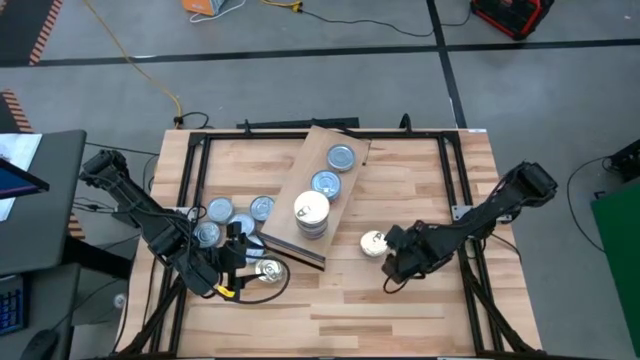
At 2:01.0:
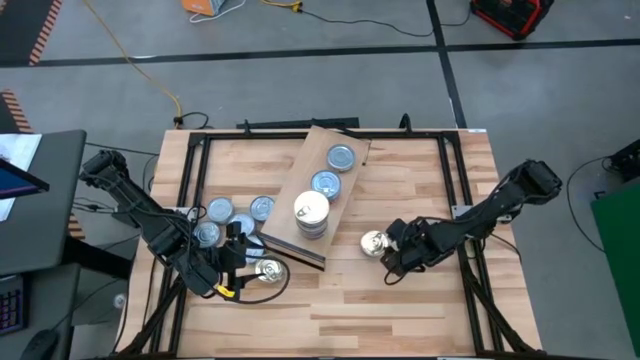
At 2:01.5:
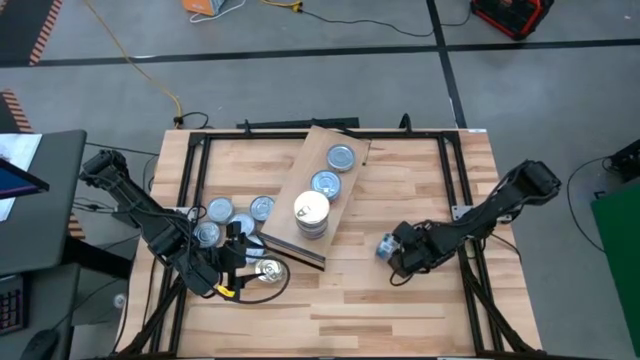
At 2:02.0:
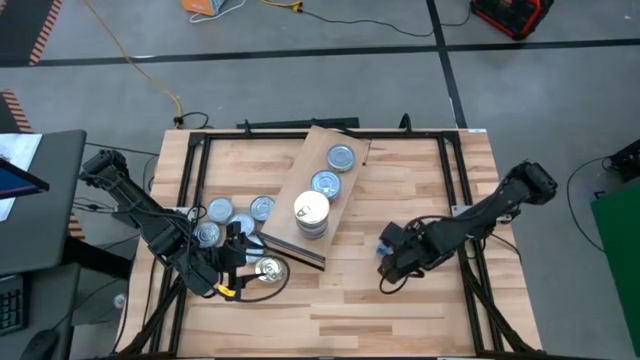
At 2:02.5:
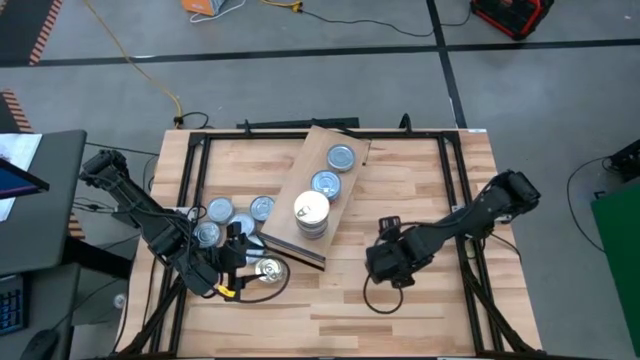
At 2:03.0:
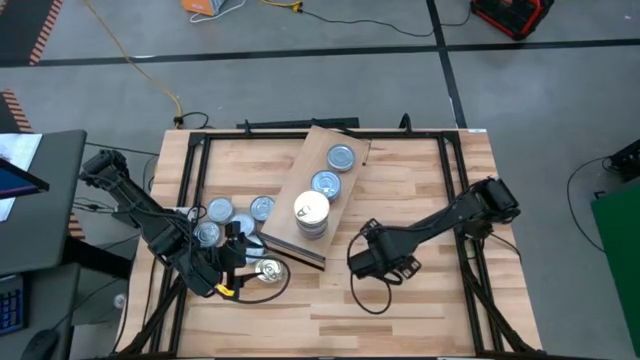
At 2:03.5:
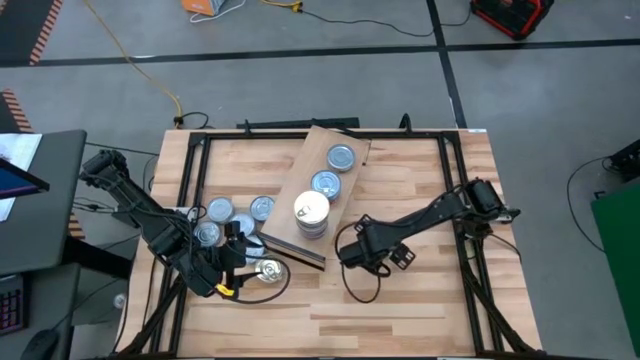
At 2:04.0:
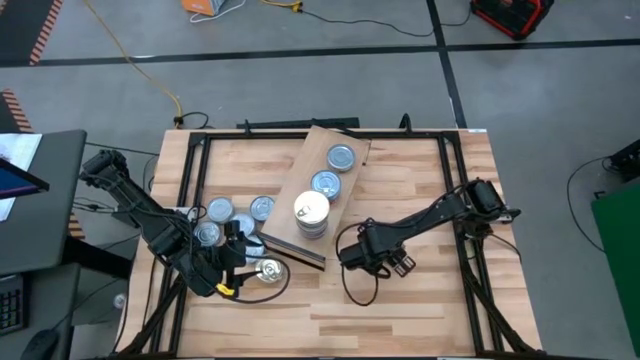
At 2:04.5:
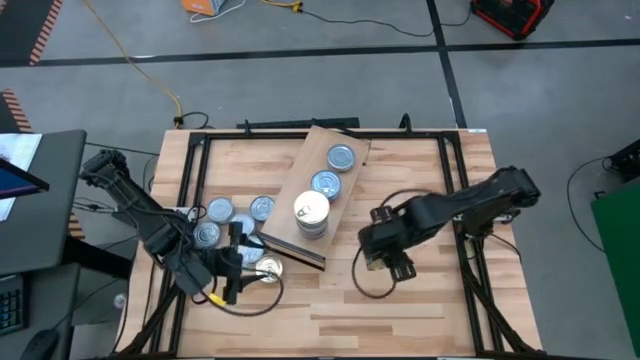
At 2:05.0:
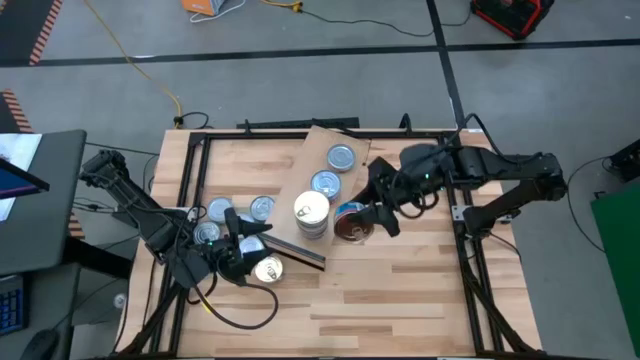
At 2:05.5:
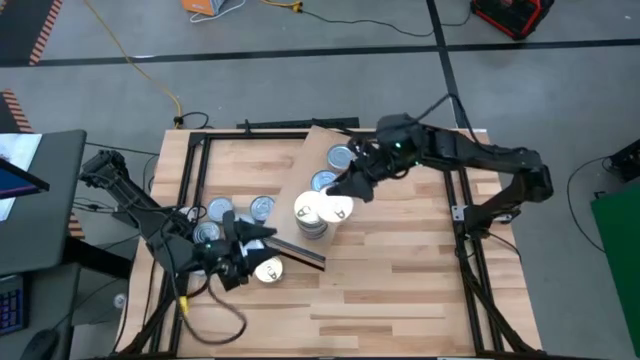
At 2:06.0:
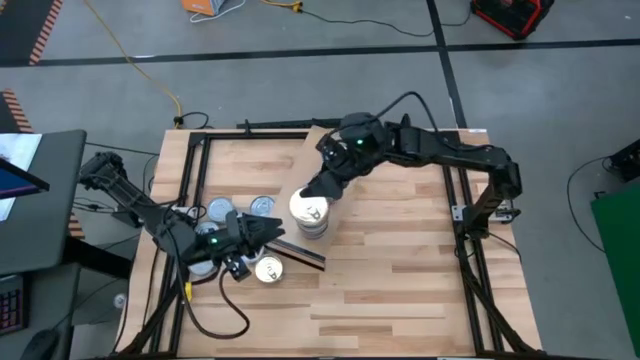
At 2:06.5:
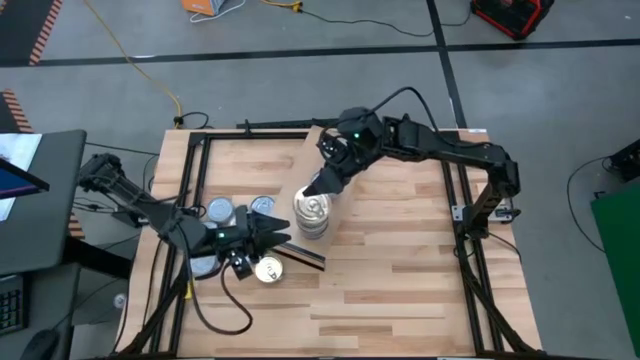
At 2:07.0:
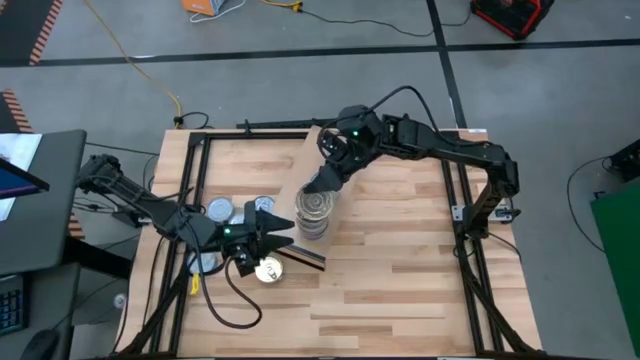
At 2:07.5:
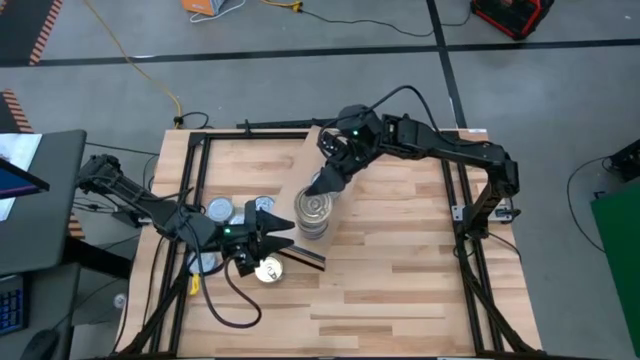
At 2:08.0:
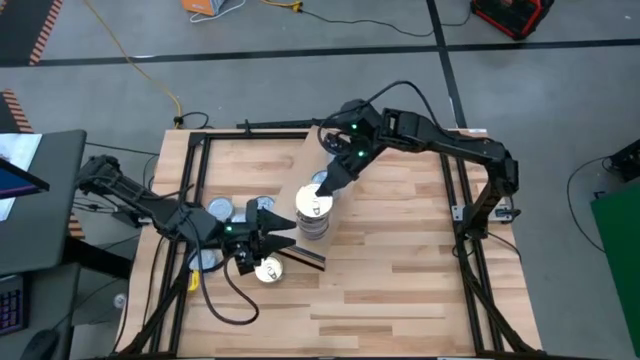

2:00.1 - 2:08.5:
Task: Stack canned seafood by type on shelf
Stack the blue pink tuna can on top of the blue pink tuna can on the shelf

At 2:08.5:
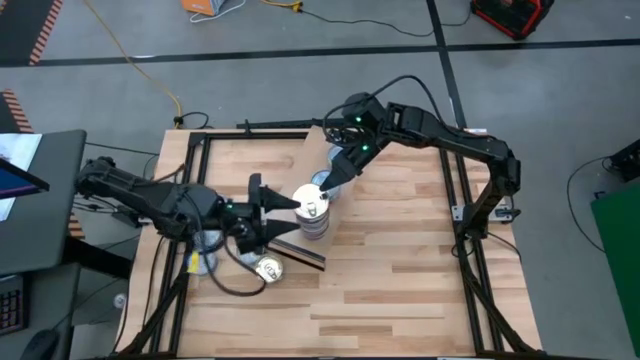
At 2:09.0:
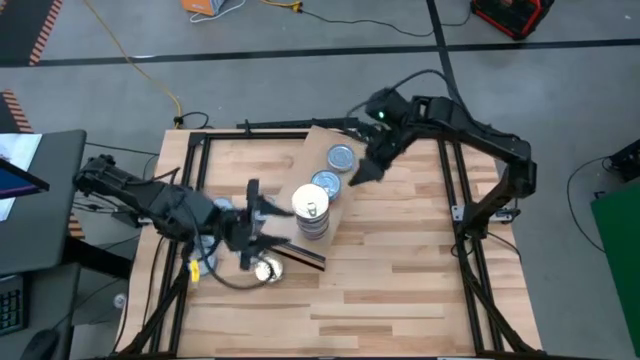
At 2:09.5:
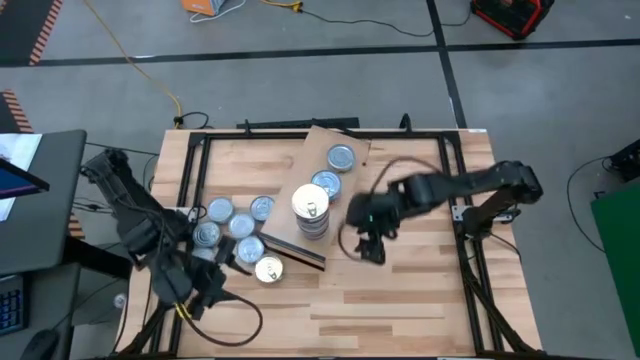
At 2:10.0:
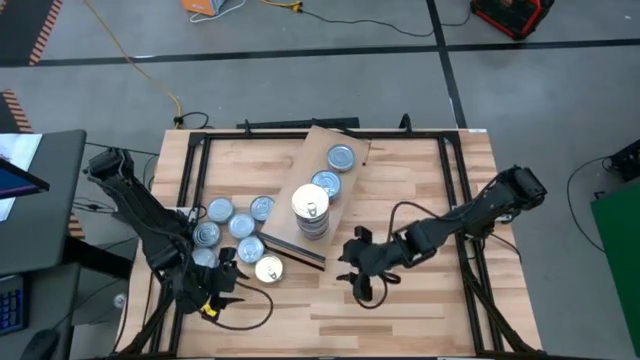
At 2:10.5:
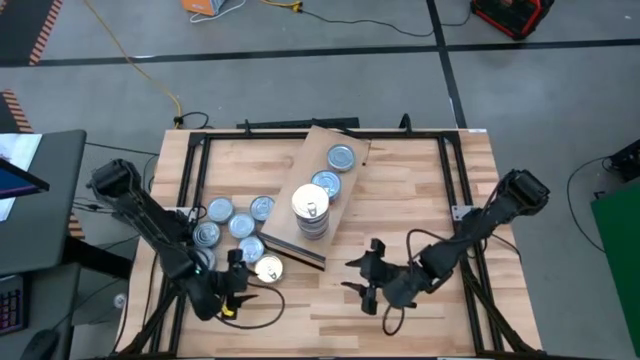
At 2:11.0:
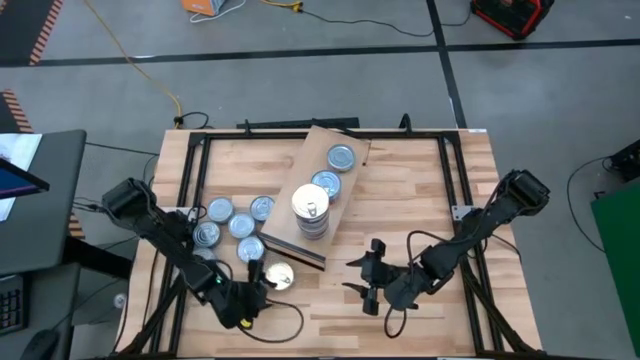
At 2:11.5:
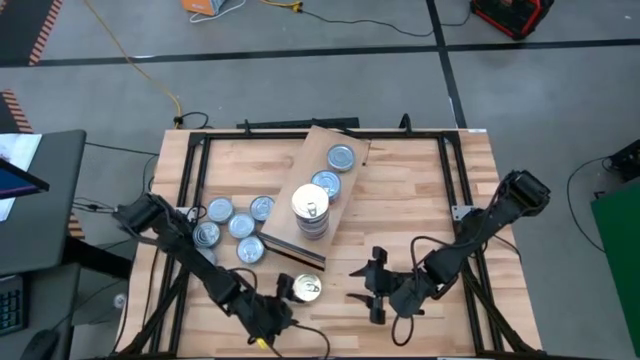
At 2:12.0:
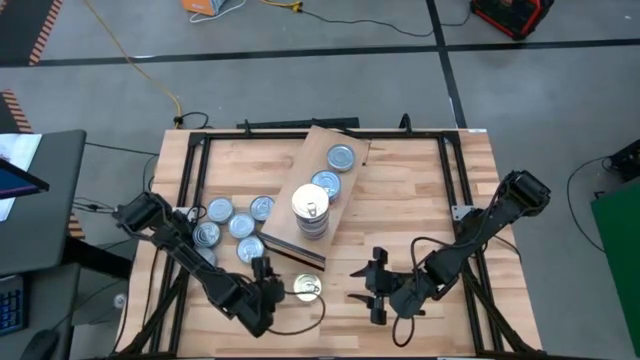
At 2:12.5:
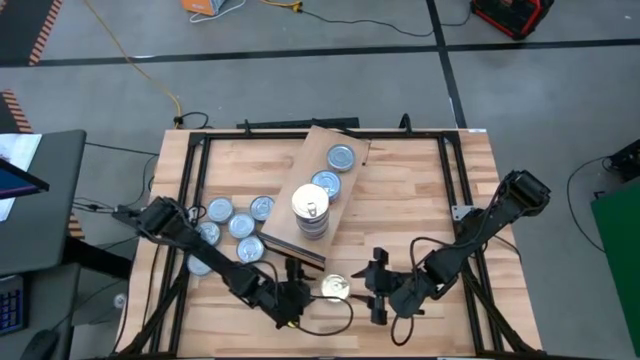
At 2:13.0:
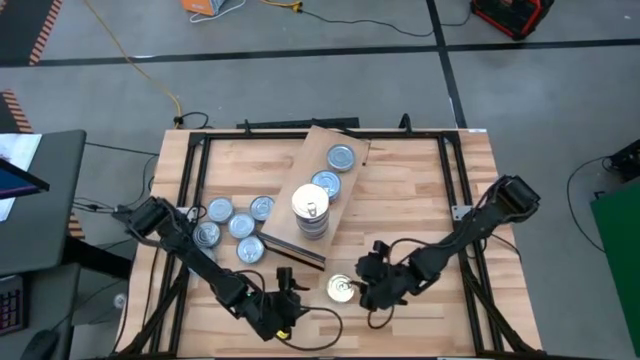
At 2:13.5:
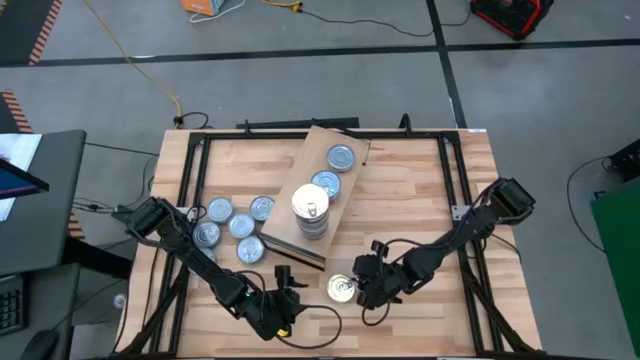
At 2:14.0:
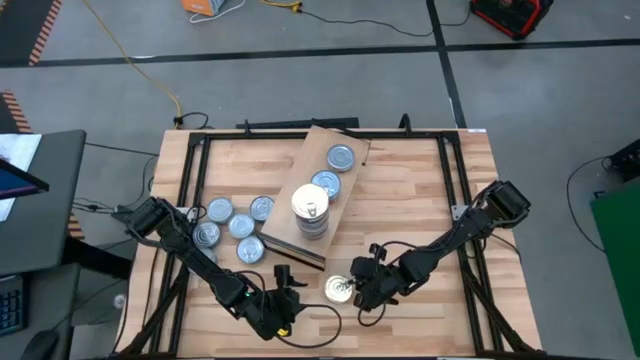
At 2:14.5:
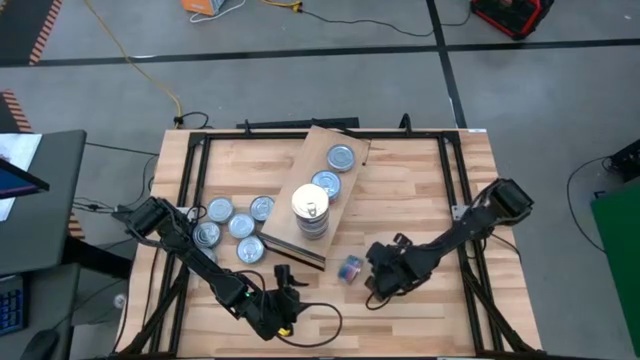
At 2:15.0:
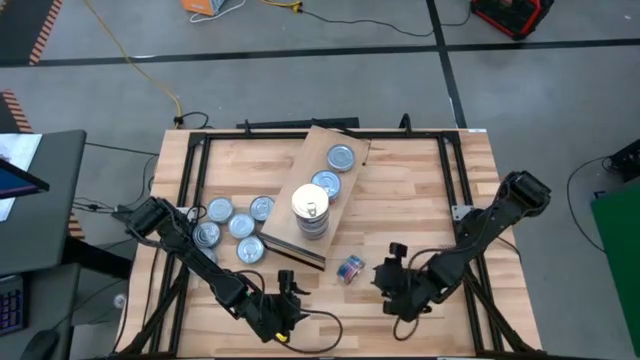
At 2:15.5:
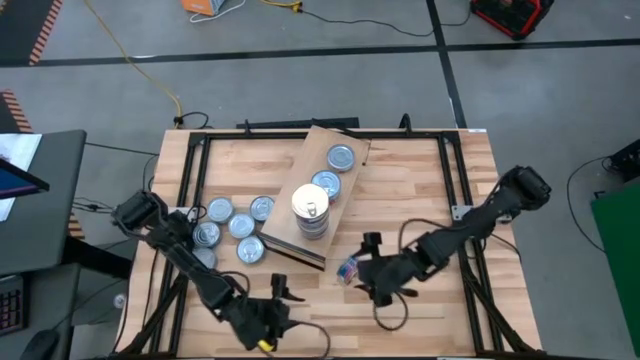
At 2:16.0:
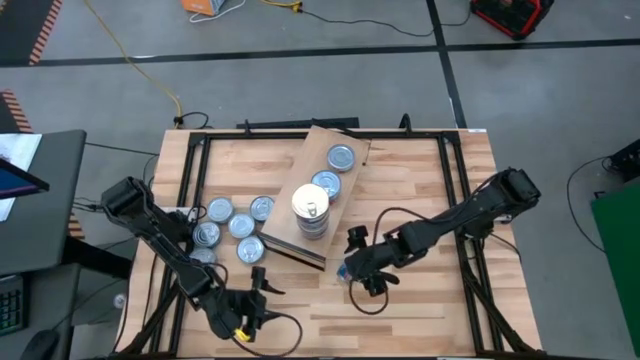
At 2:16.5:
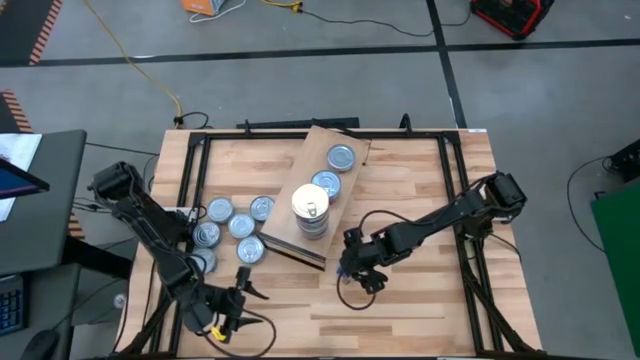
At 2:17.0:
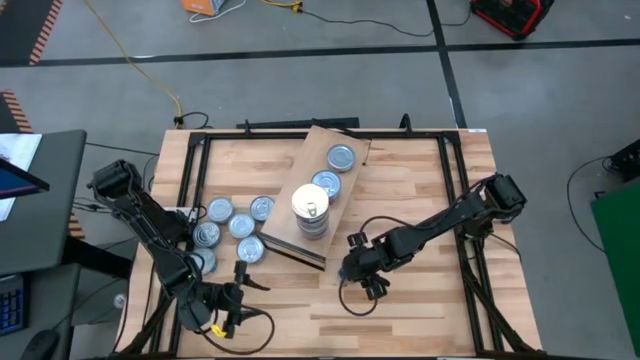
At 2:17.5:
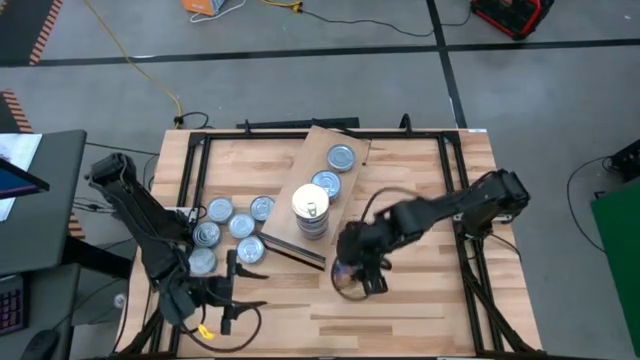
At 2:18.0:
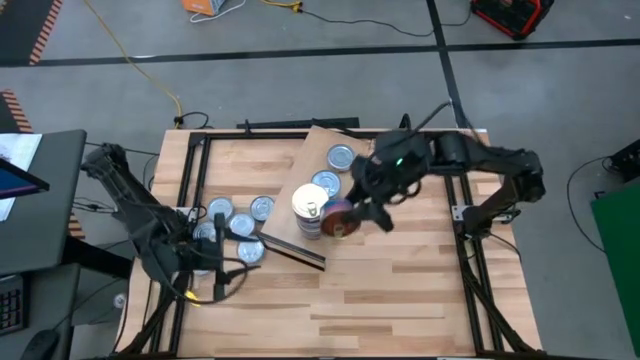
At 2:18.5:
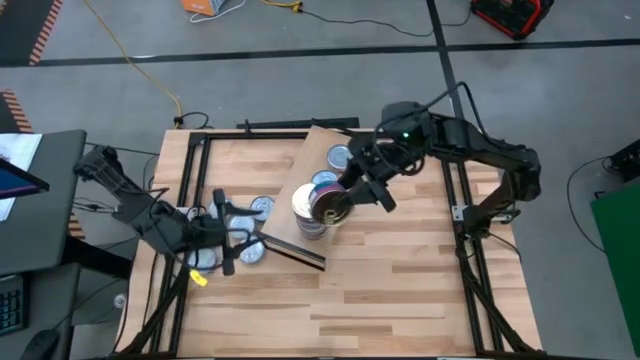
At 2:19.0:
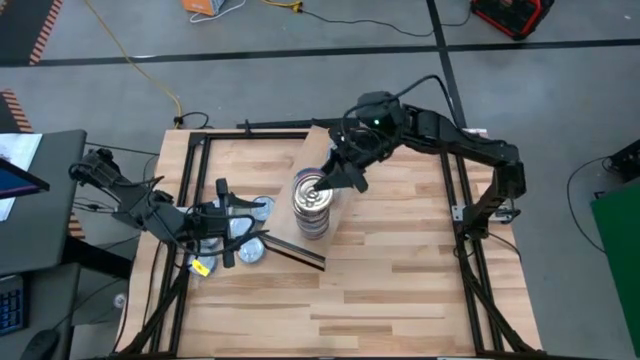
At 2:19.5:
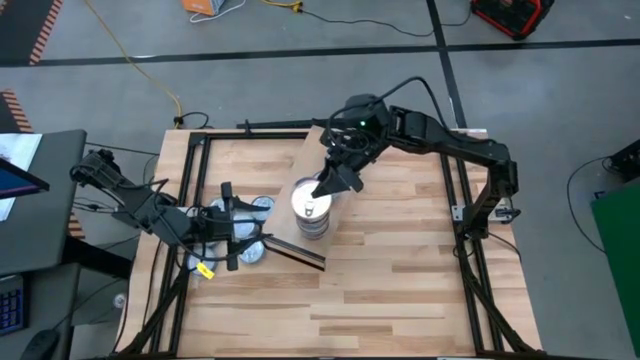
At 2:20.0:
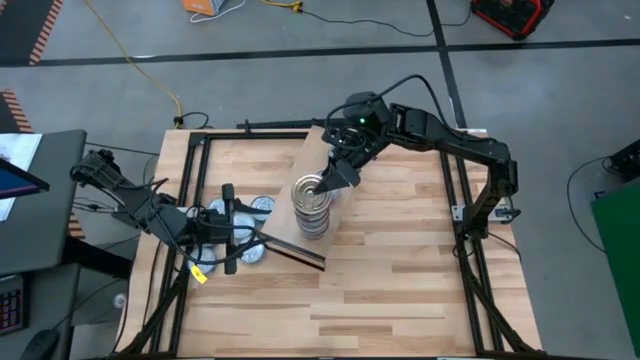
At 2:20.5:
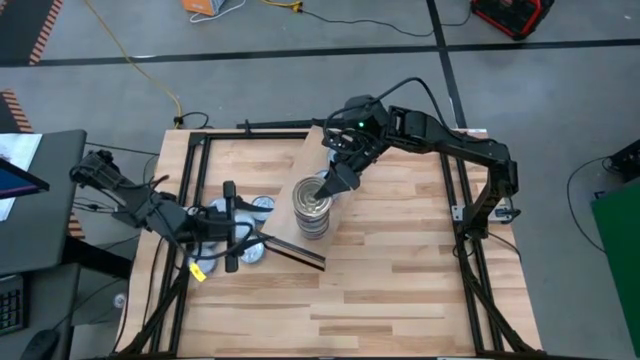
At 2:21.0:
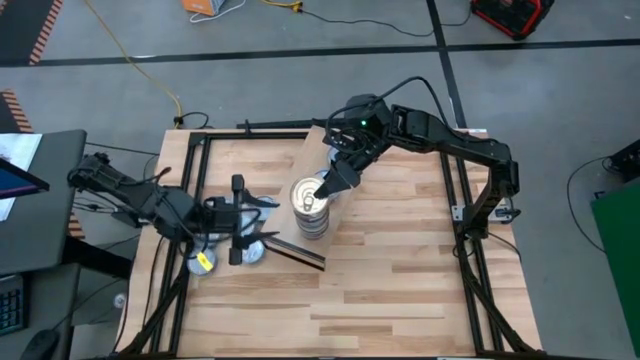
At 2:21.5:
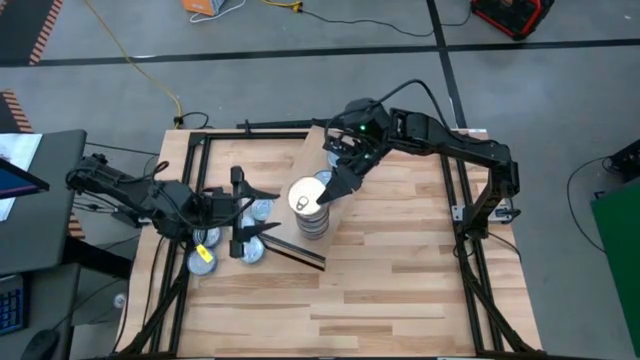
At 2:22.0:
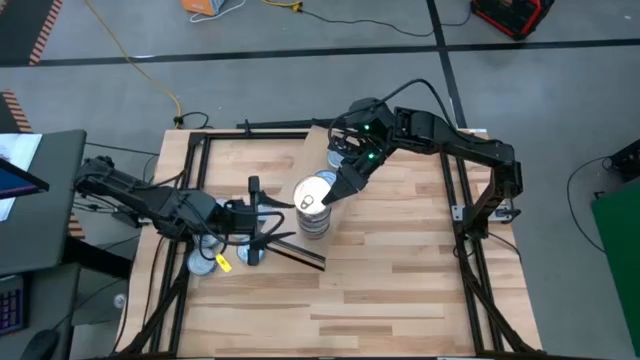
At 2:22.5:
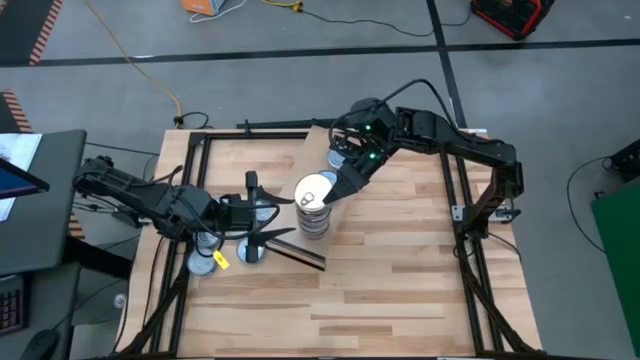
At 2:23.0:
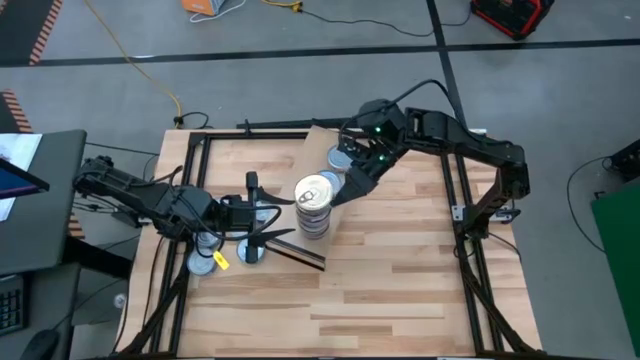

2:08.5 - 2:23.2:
Stack the blue pink tuna can on top of the blue pink tuna can on the shelf
